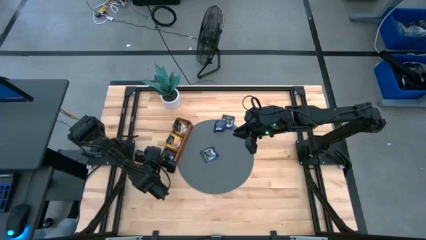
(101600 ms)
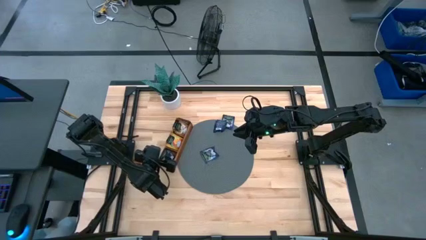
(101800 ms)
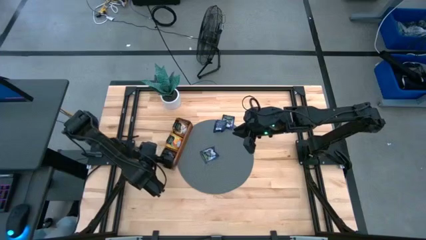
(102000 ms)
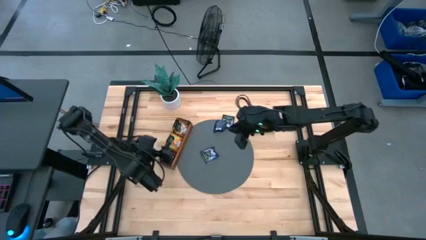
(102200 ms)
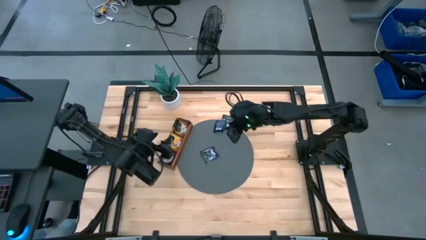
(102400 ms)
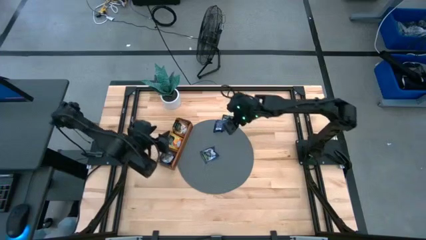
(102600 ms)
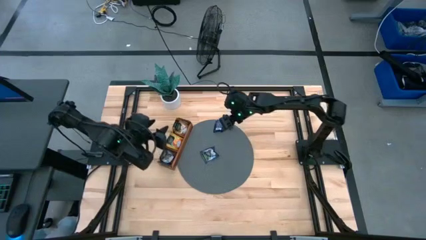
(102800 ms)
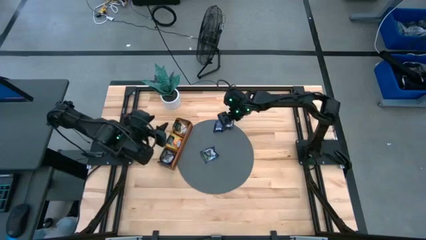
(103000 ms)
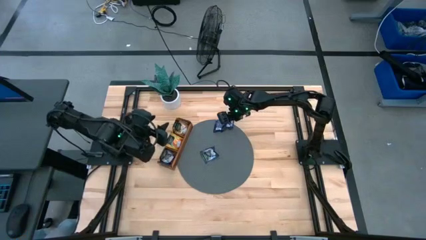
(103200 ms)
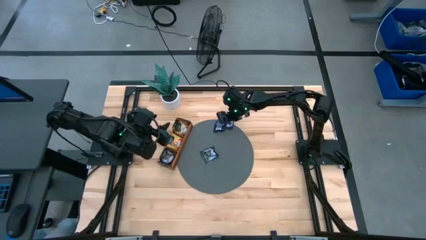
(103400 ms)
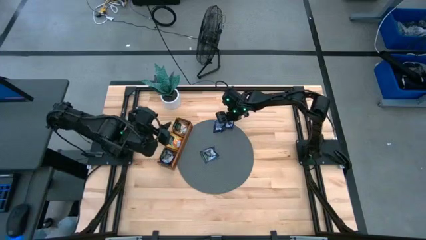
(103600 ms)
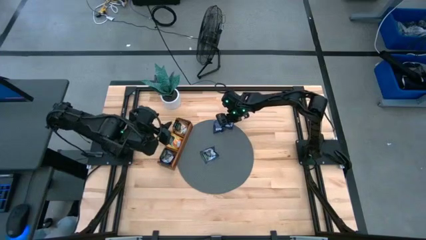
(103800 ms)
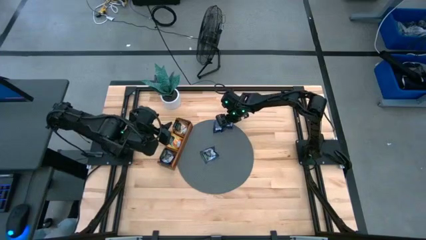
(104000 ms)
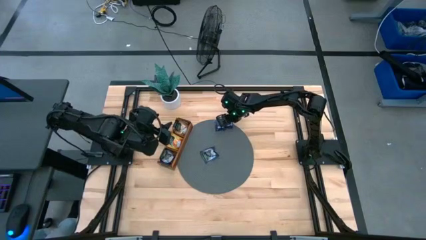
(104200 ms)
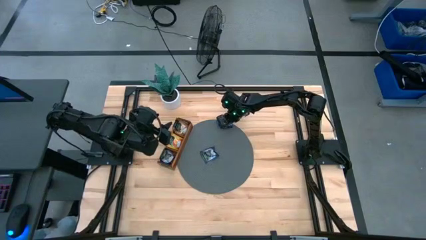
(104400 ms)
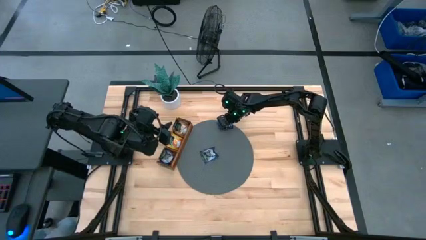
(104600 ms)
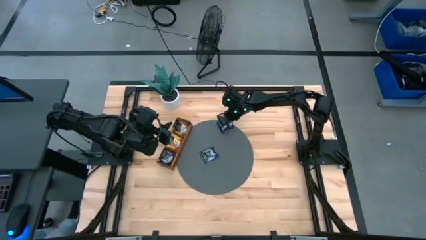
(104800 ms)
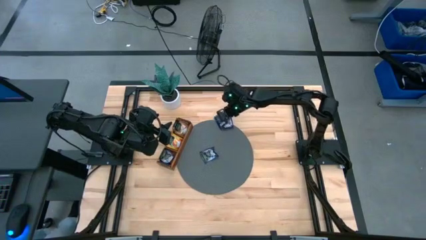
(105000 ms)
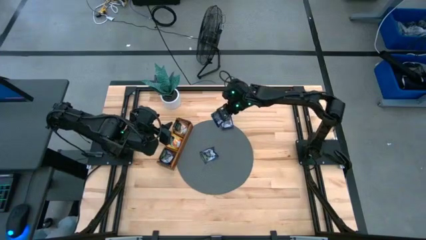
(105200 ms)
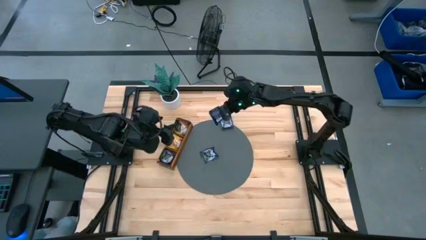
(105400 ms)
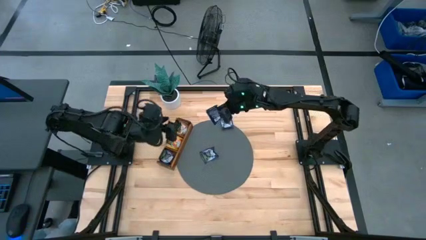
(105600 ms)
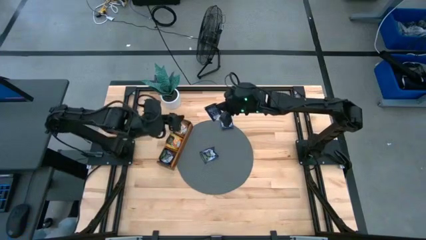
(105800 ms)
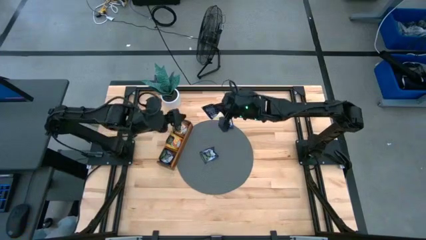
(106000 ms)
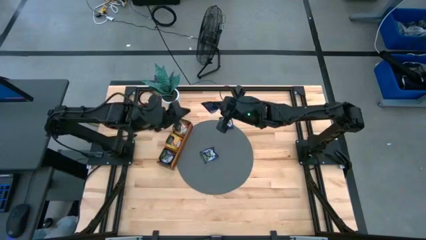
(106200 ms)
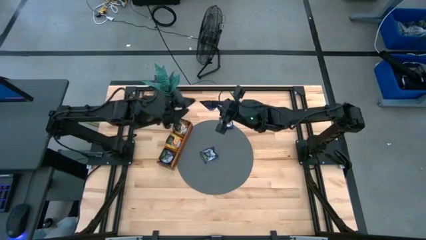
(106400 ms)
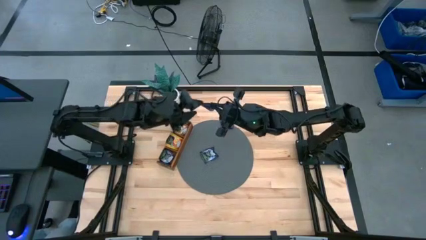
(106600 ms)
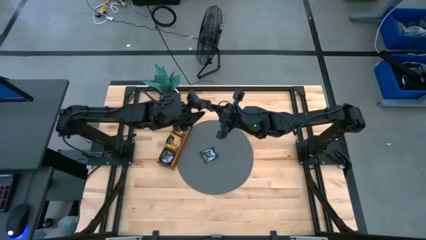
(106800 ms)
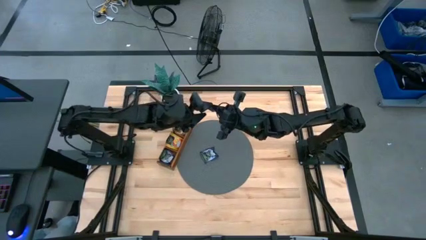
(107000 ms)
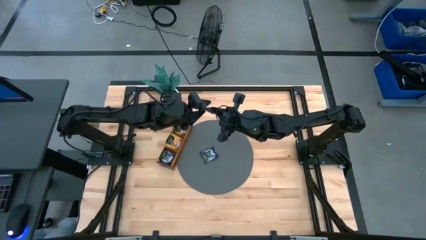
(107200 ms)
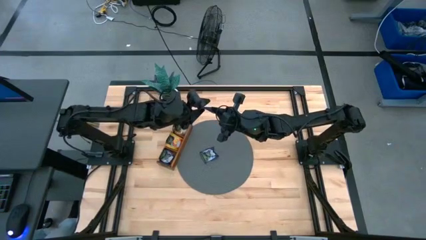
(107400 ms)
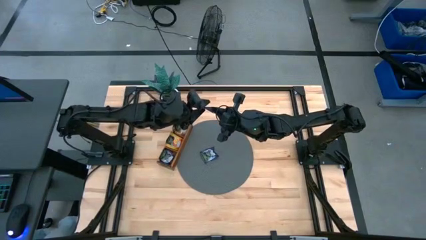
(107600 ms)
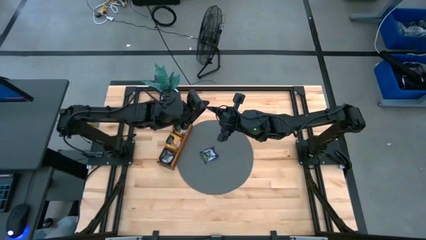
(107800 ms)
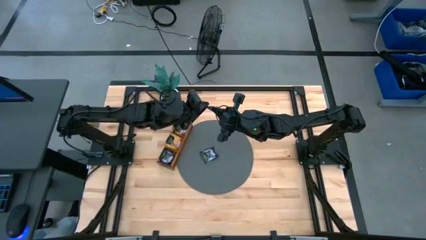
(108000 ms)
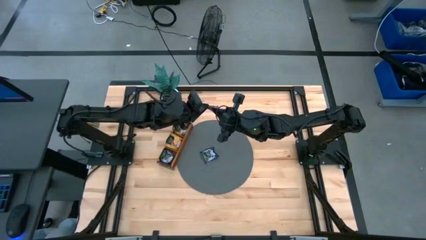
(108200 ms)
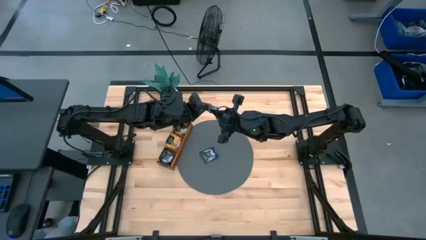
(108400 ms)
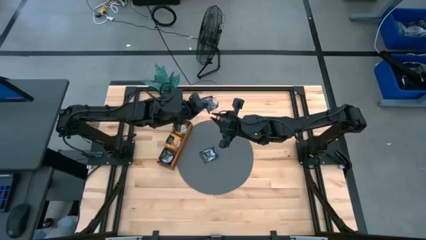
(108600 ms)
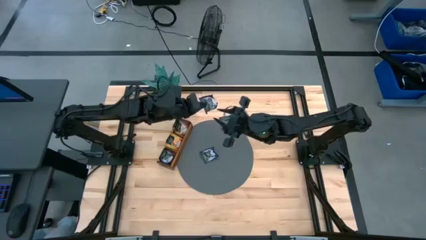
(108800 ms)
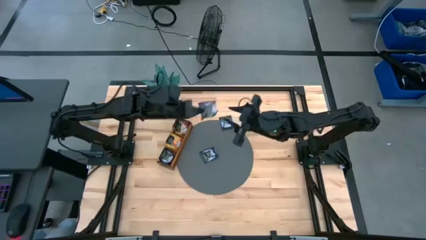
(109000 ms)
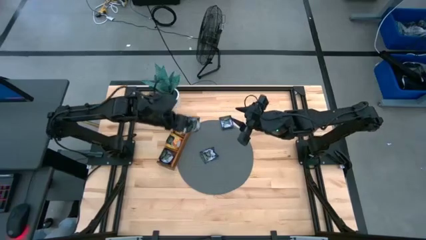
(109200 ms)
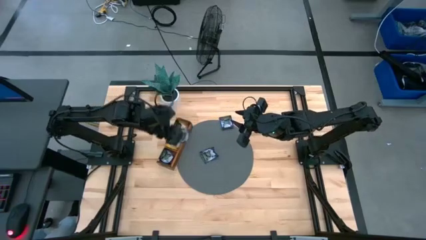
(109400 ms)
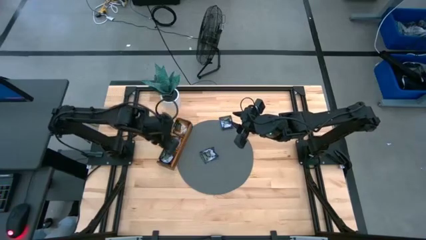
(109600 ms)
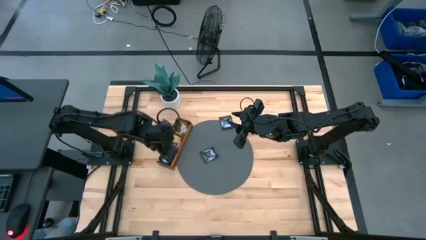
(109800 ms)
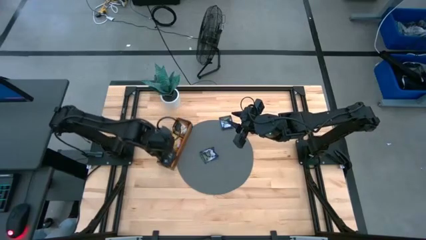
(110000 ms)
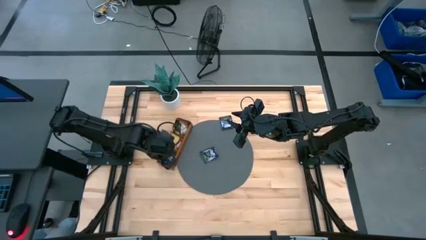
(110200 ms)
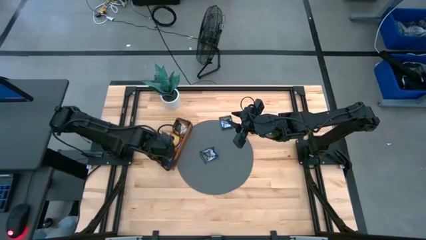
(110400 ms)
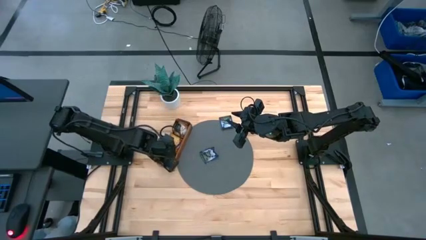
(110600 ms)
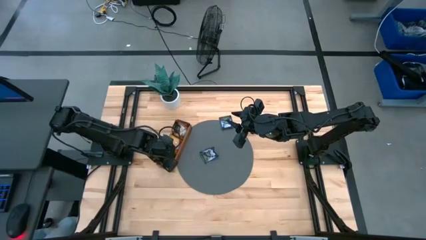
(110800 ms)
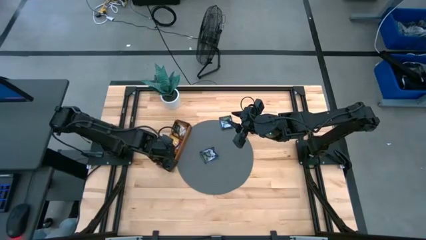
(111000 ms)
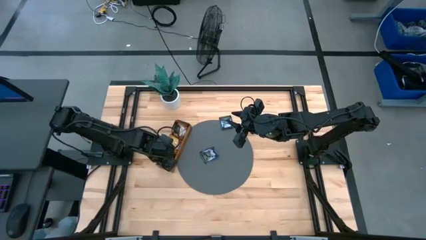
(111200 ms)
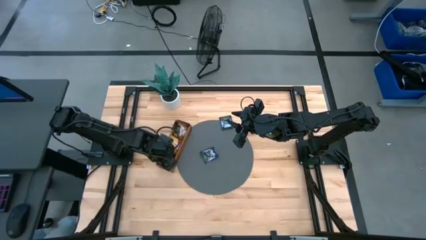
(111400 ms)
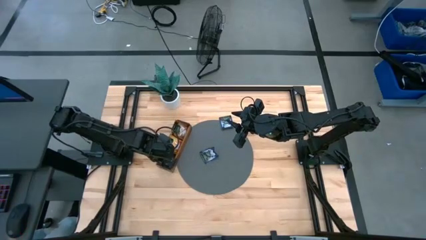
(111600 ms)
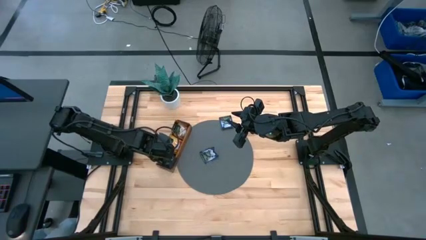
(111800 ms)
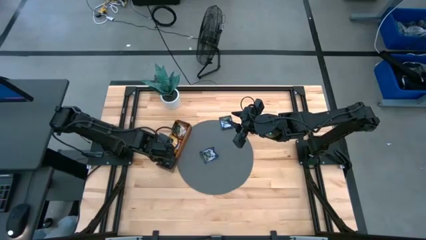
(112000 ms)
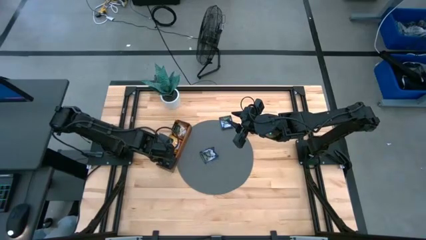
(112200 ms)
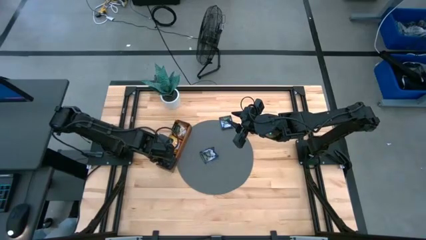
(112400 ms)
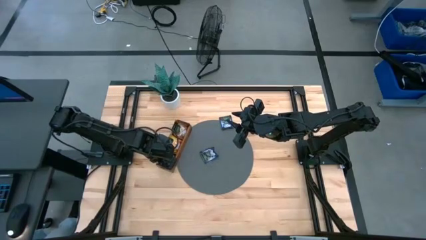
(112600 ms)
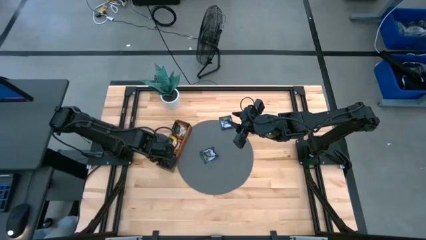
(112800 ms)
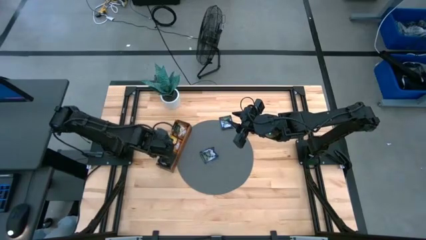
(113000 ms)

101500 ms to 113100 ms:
Task: Pick & Place Tea
Put the purple tea bag into the bottom section of the wooden organizer

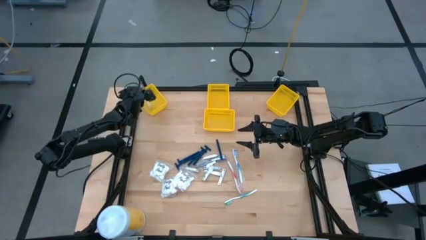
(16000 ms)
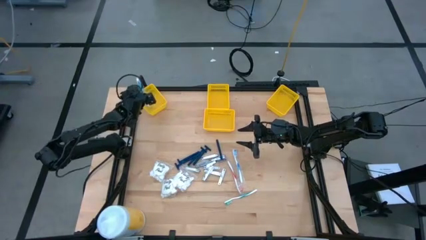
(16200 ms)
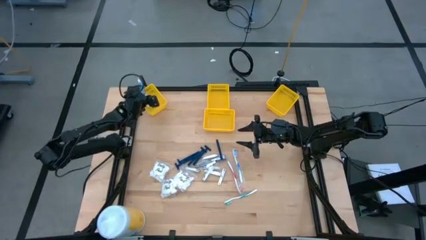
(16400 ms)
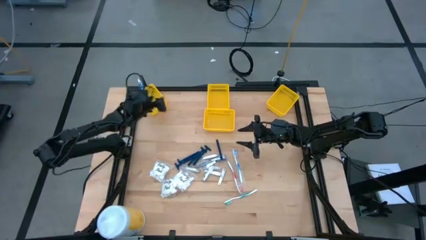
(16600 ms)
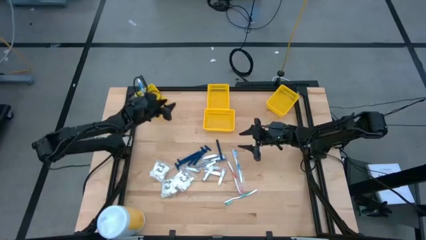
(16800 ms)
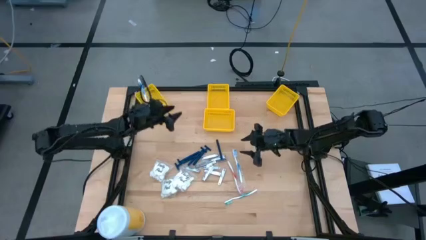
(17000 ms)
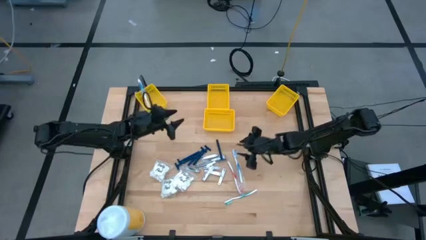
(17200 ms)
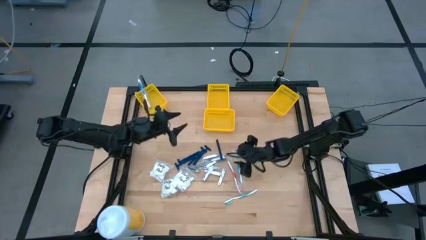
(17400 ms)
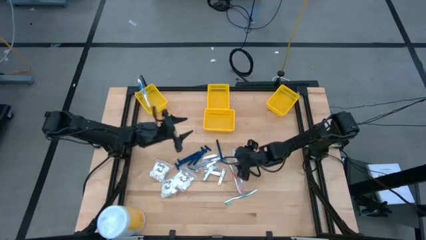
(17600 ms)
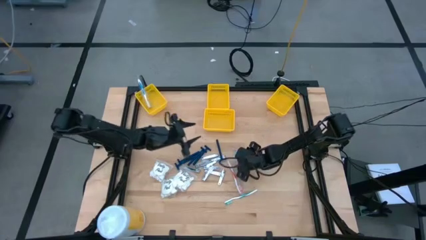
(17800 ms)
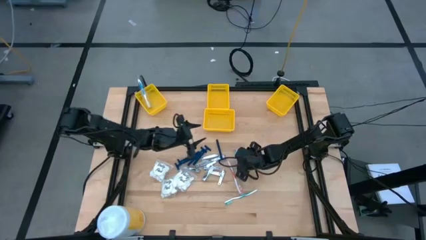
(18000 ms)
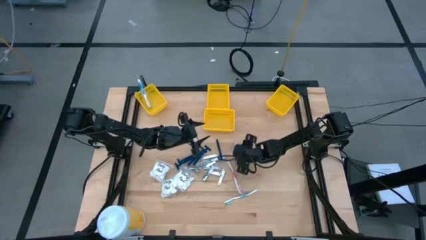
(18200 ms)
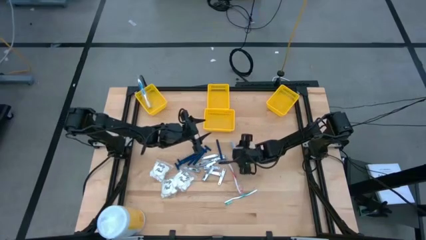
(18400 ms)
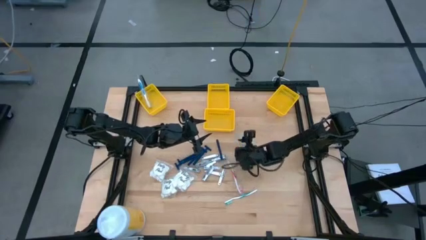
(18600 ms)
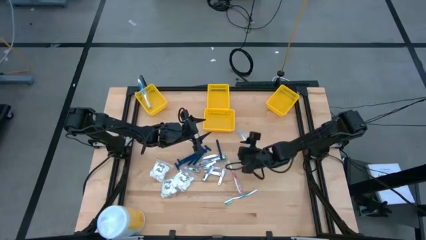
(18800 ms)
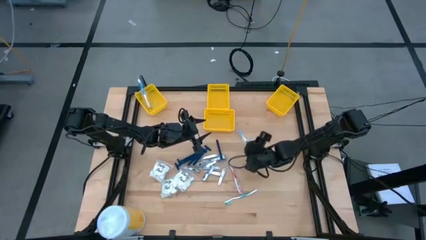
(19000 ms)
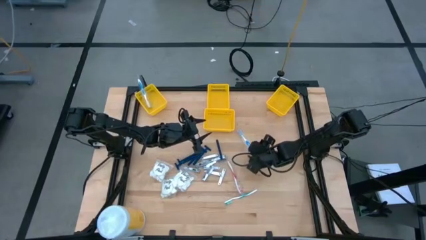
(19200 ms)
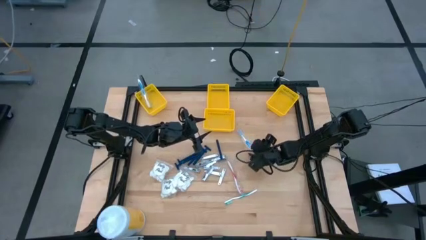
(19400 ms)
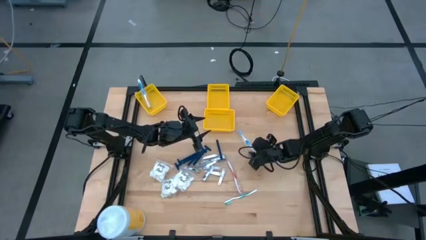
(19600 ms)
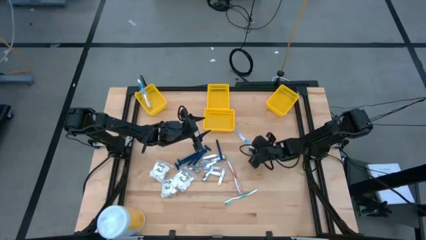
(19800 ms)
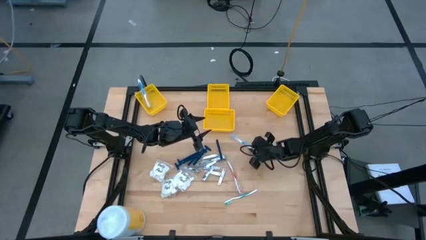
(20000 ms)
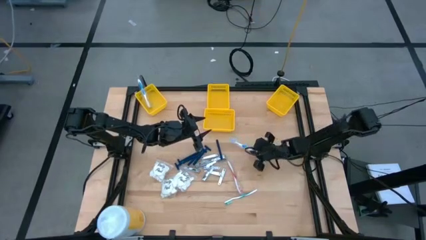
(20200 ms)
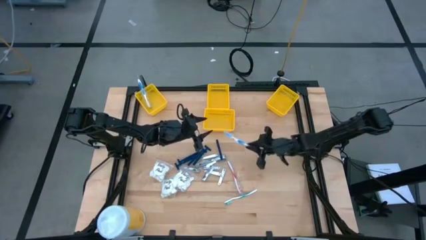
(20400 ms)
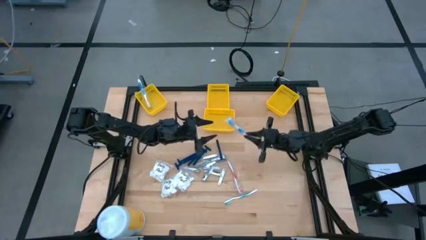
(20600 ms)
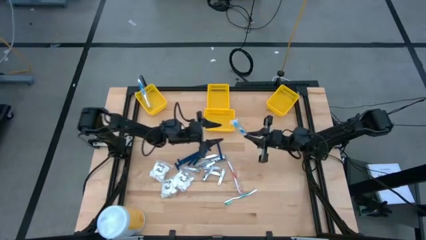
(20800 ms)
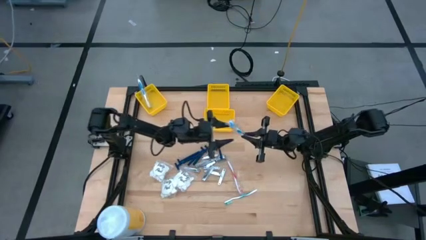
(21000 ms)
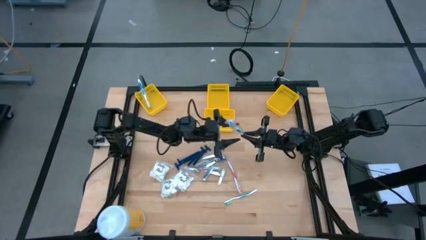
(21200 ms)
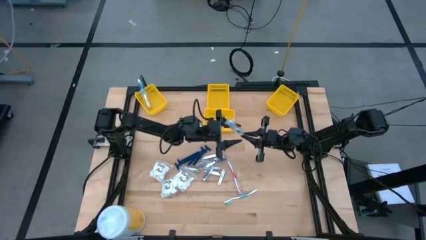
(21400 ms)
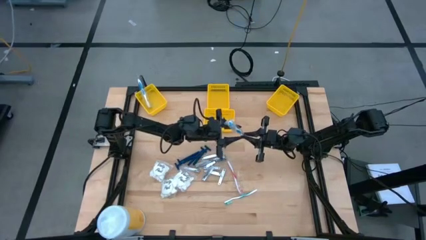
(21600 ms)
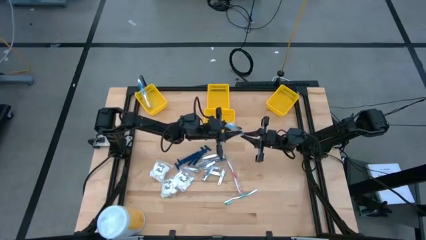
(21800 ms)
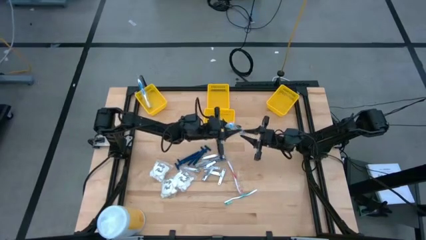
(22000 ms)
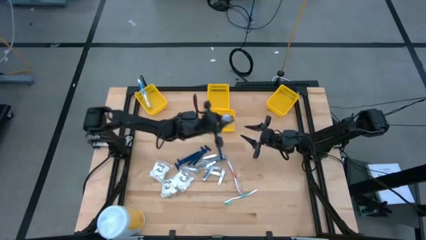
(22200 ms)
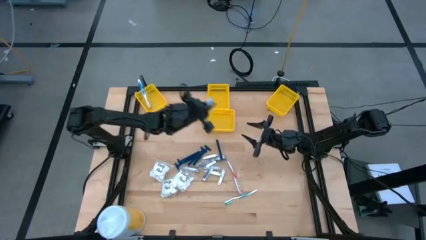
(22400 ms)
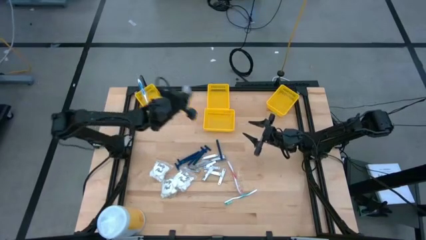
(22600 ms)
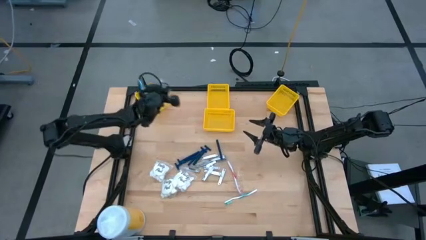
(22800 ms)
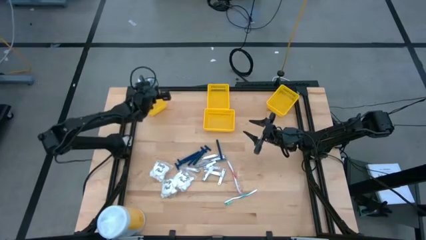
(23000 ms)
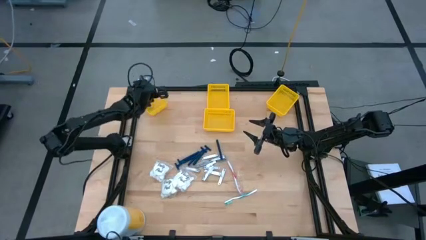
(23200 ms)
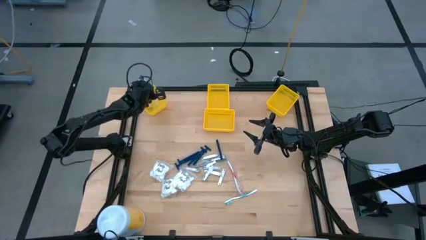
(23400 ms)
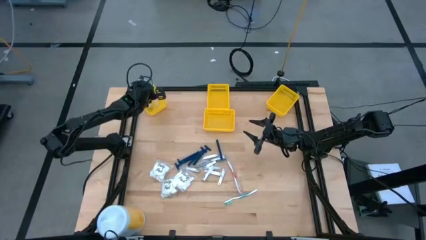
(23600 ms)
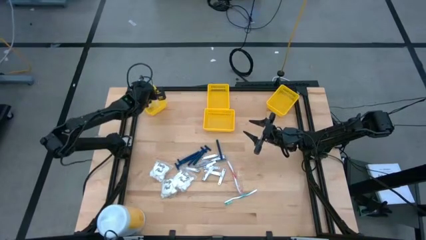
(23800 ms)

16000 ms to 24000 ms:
Task: Pick & Place Travel size toiletries
Put the blue toothbrush into the left yellow bin
